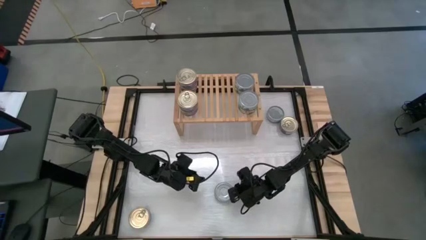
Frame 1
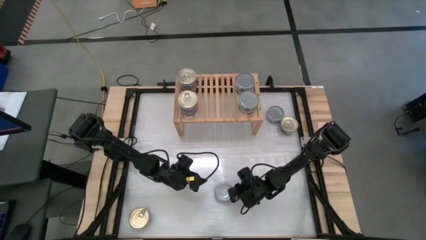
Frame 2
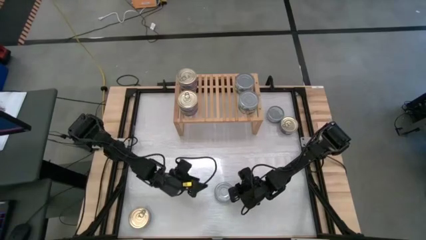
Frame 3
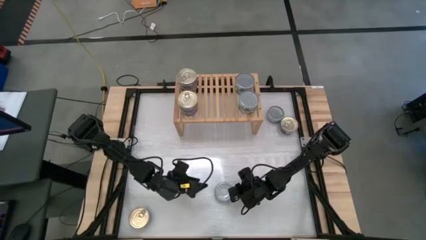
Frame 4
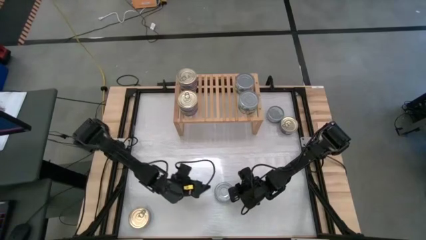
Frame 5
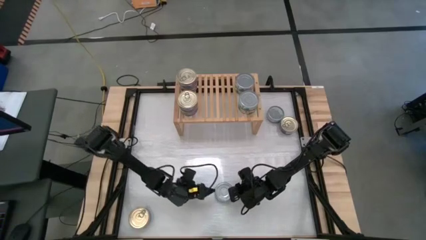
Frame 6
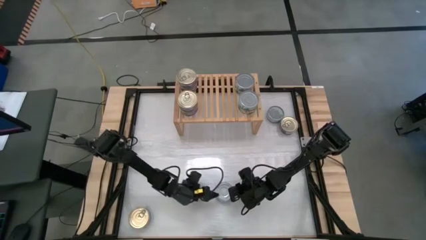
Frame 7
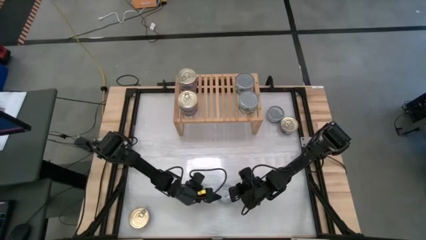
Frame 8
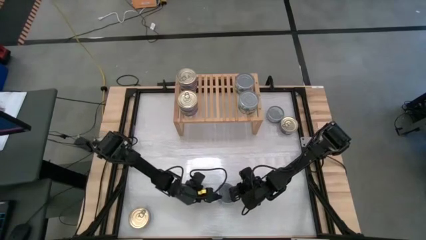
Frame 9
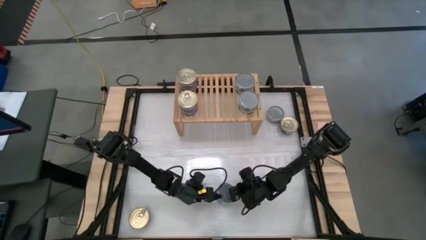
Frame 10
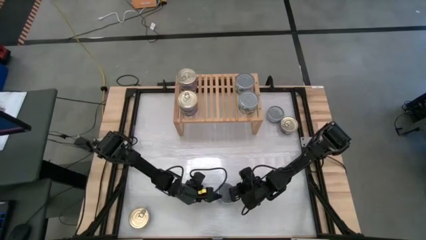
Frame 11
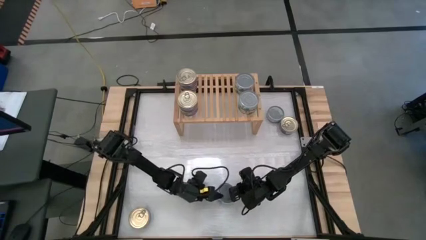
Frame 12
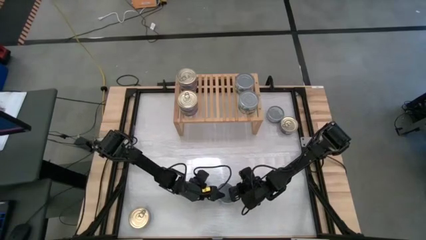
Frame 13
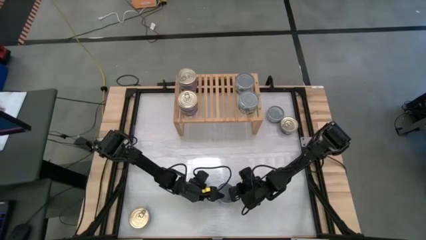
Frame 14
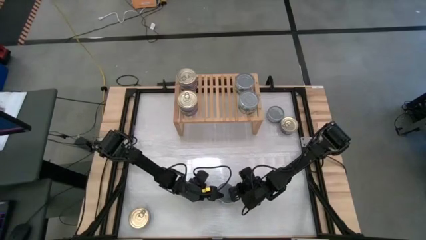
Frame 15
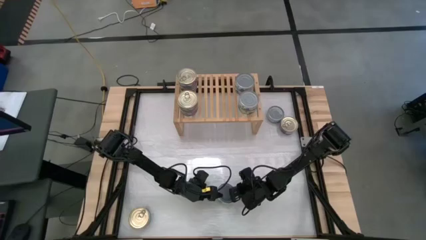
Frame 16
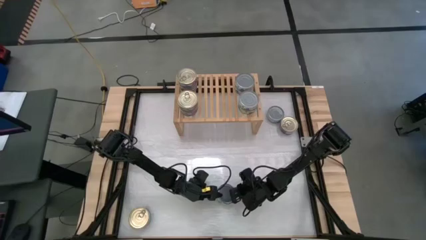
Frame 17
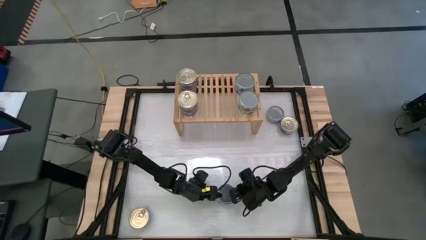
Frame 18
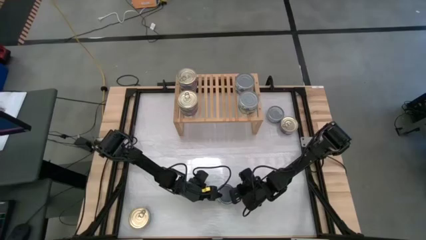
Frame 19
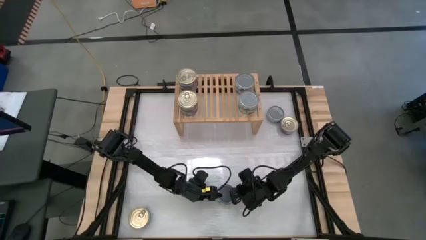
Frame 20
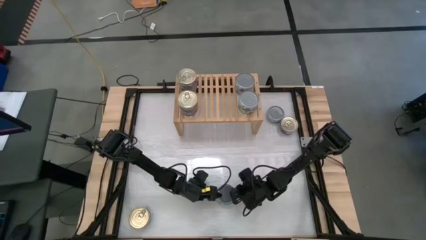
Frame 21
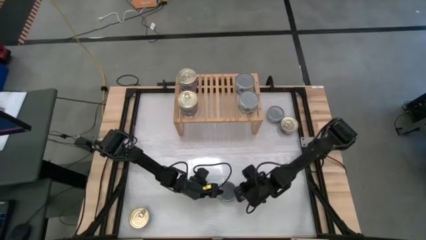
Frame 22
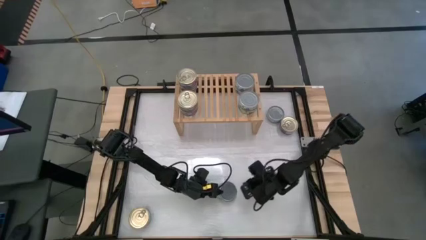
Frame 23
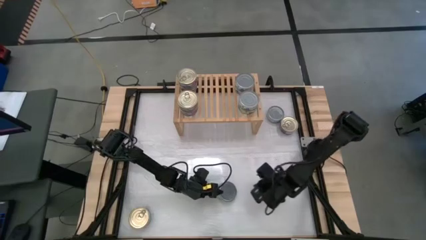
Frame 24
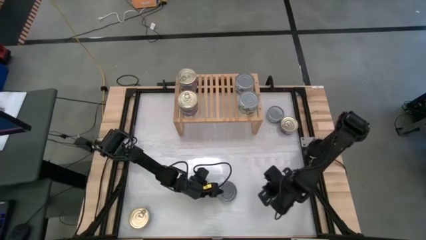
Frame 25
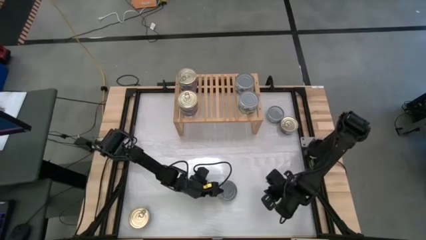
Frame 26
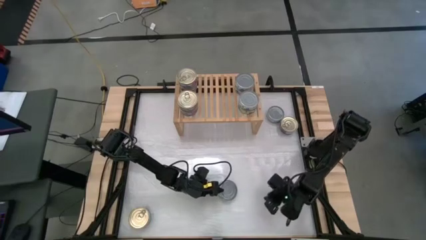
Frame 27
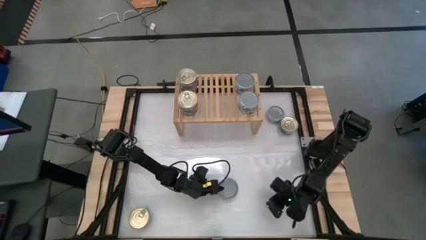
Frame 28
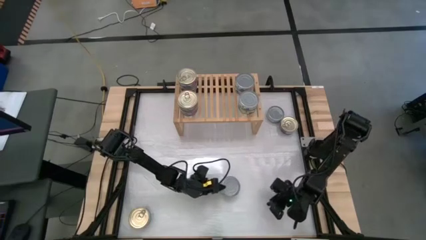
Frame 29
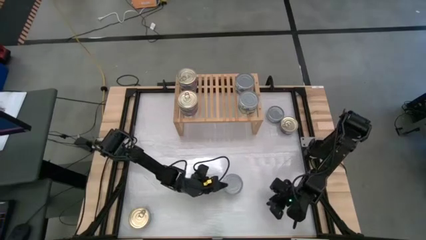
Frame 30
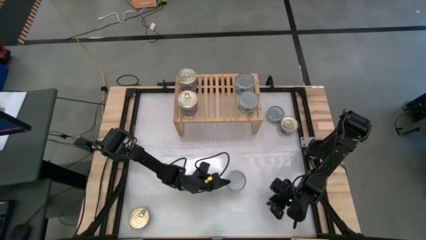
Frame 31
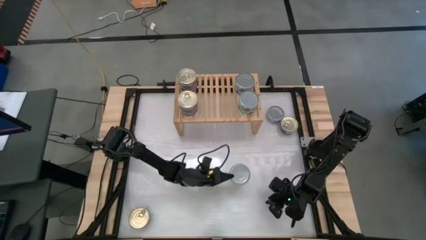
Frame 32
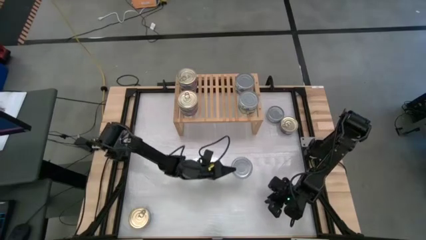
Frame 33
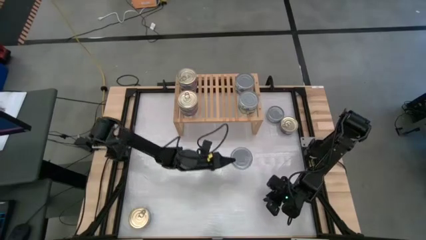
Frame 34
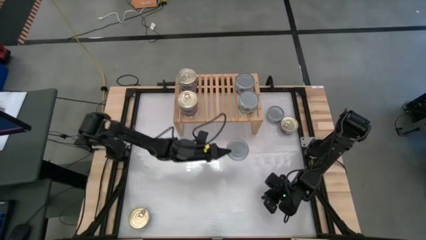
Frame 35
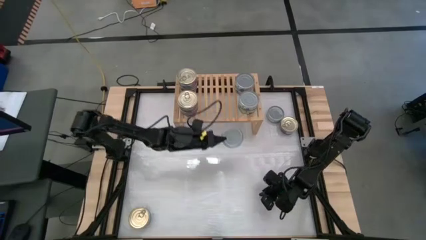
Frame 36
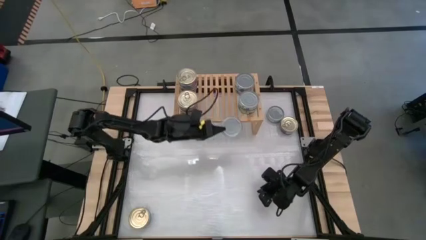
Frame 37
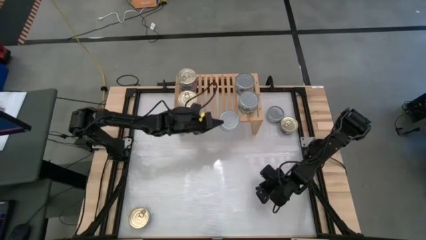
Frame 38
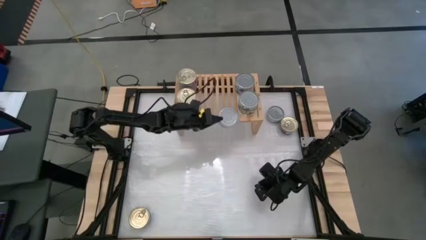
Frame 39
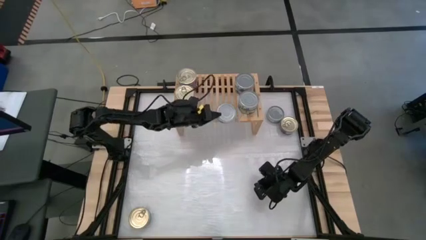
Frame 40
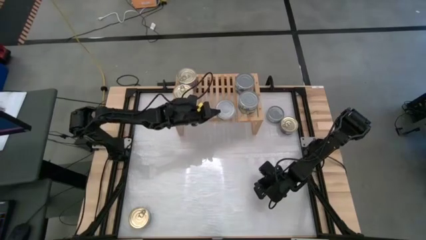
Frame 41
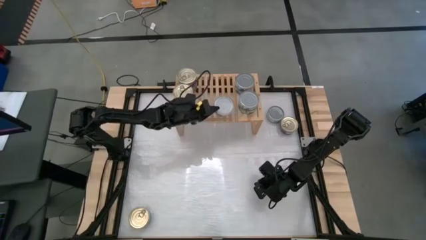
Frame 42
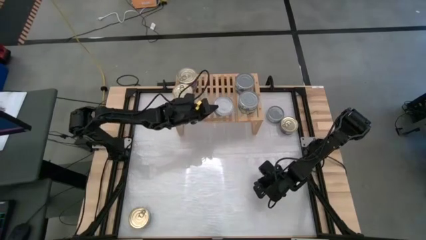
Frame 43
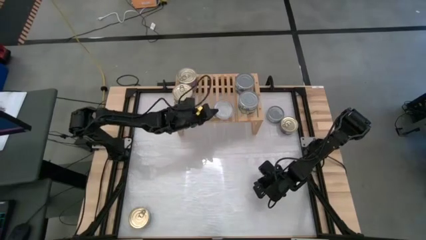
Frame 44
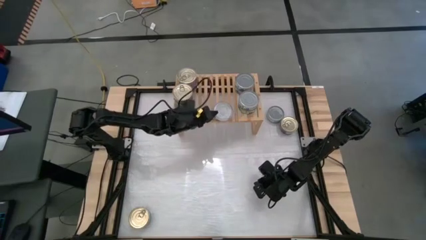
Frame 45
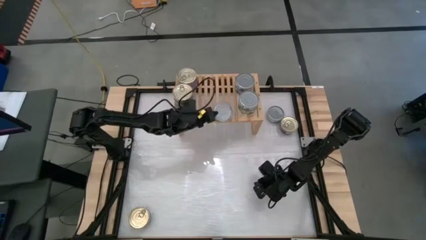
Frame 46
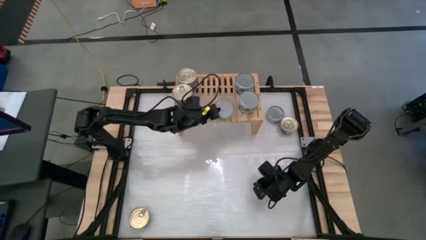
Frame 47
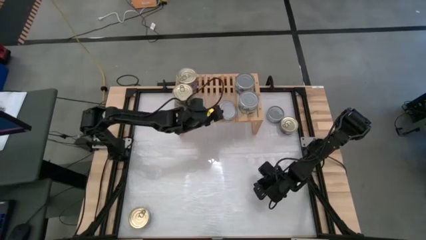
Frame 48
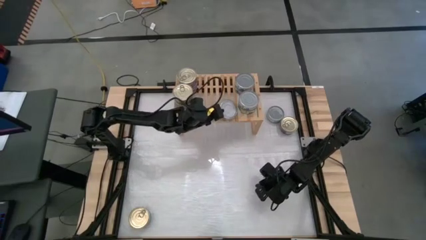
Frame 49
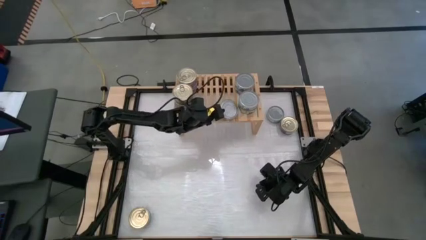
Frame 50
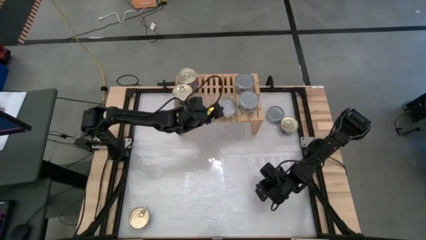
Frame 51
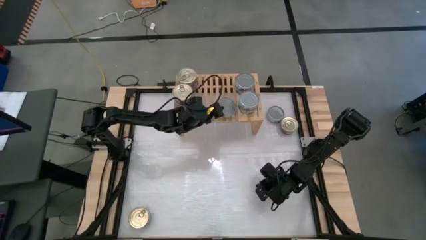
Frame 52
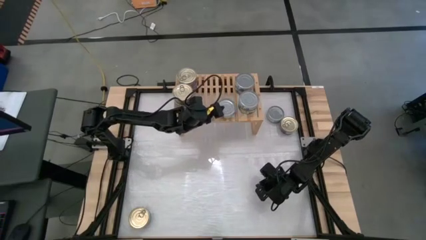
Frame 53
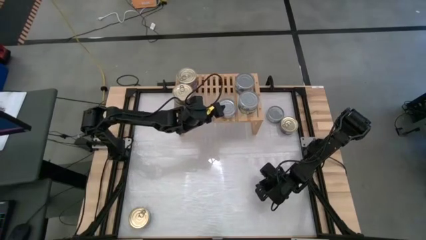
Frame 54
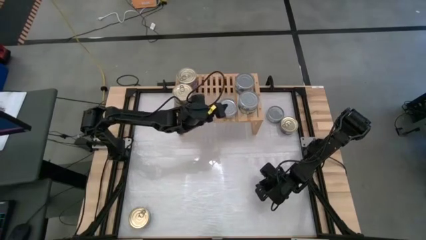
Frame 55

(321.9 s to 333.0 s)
Task: Stack canned seafood by type on shelf
Put the green tuna can on the shelf aligned with the other green tuna cans
